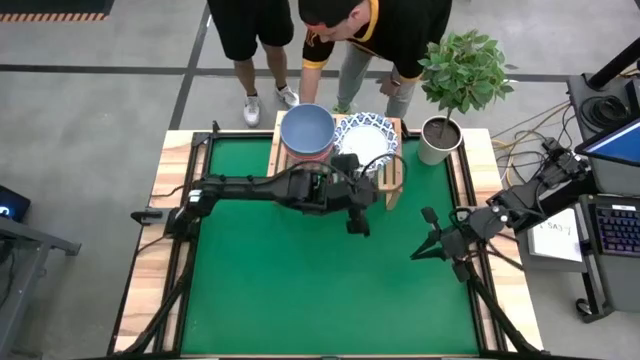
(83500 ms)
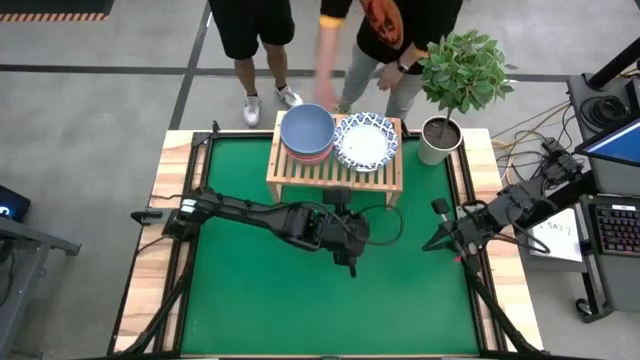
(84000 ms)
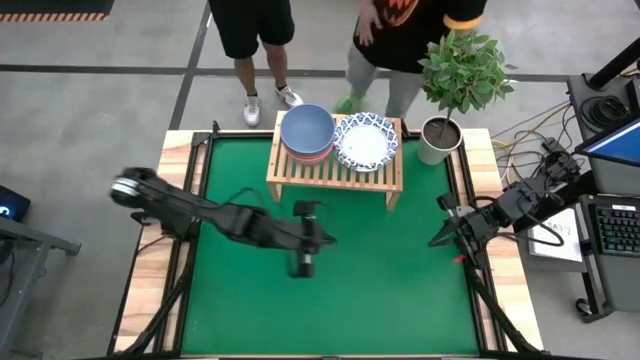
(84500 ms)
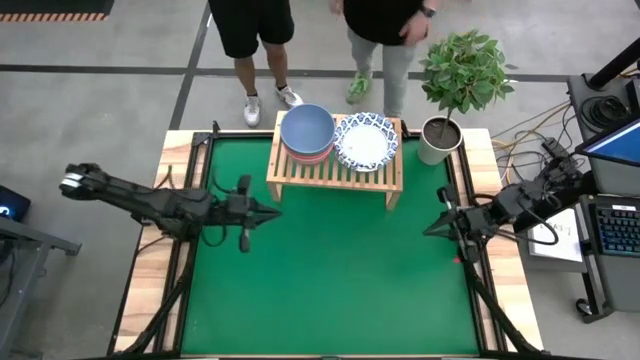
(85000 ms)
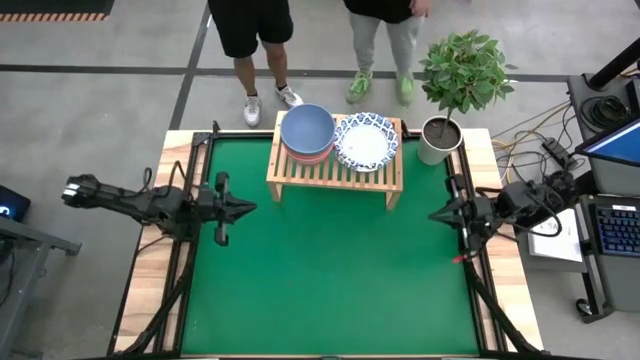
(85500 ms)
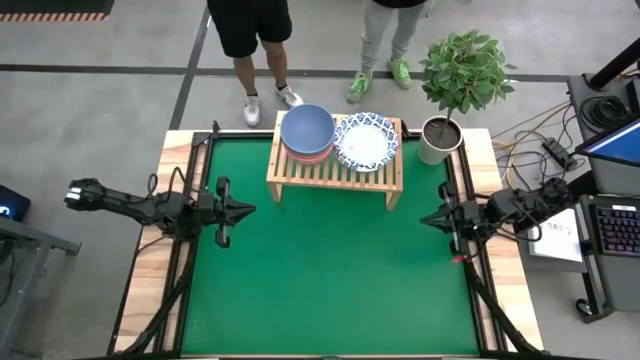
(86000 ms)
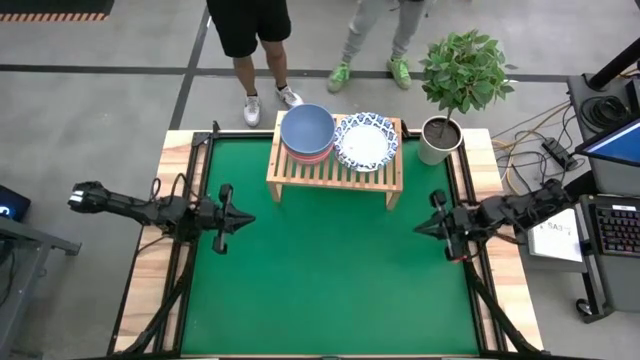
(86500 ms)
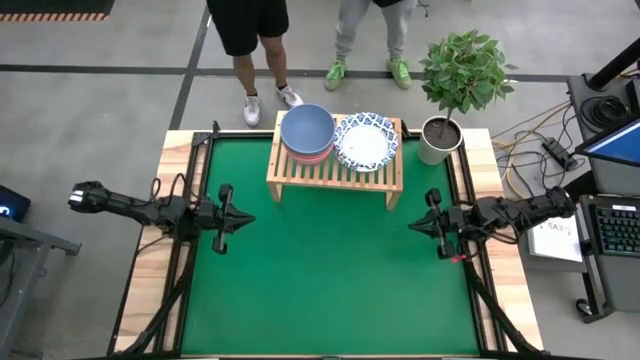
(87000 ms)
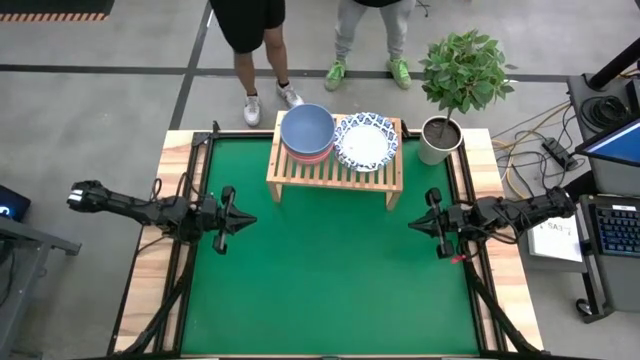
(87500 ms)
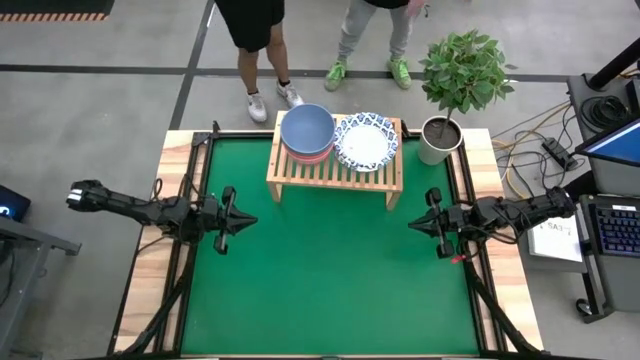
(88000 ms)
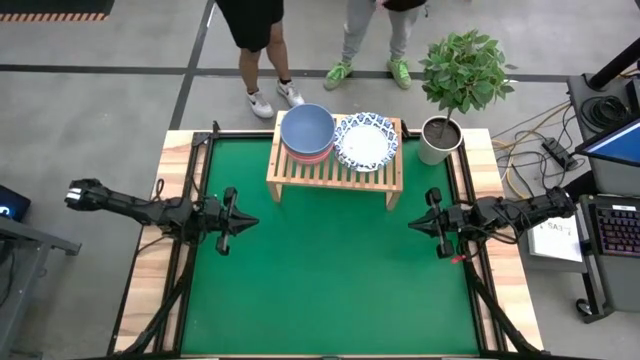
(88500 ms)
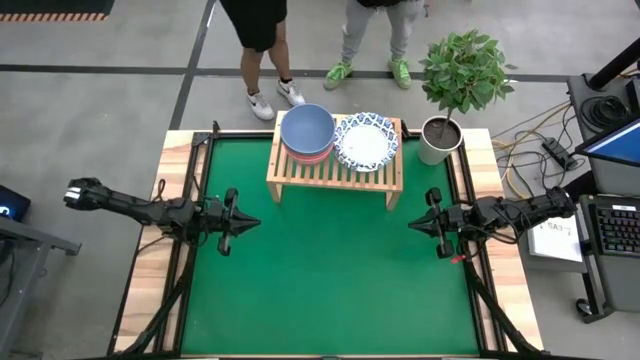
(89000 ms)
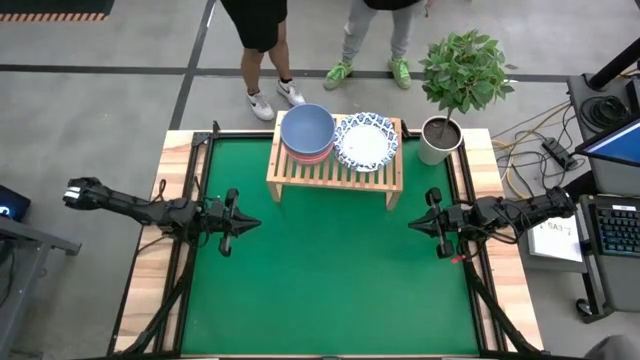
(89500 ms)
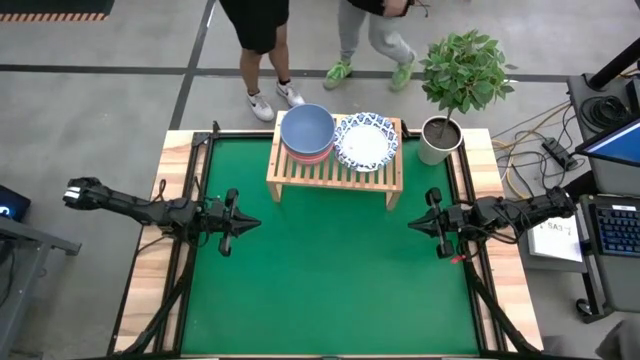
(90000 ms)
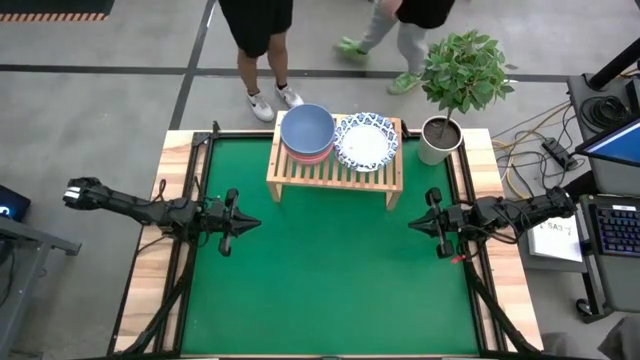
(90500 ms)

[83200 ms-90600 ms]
Task: Place and stack bowls onto a shelf
Return to Home Position

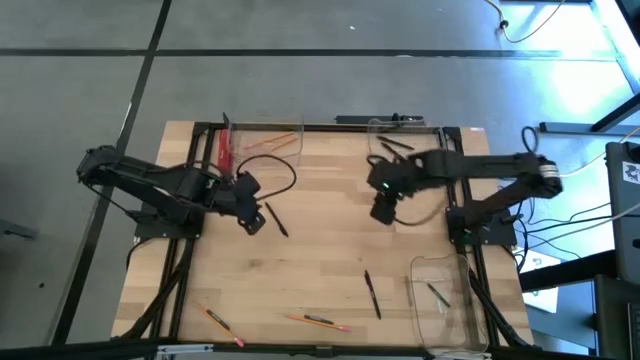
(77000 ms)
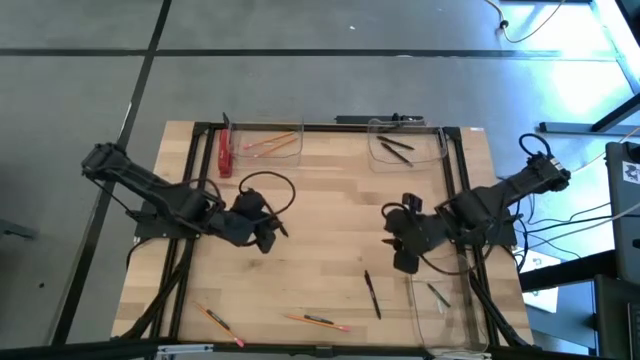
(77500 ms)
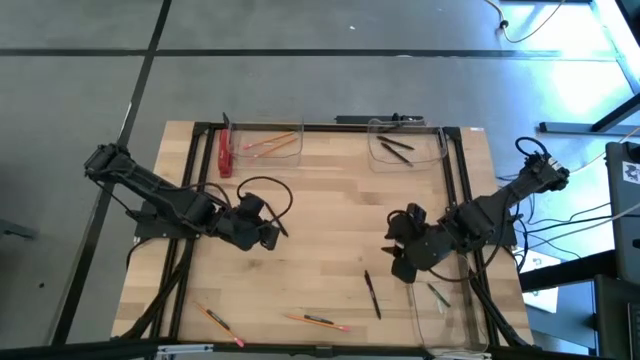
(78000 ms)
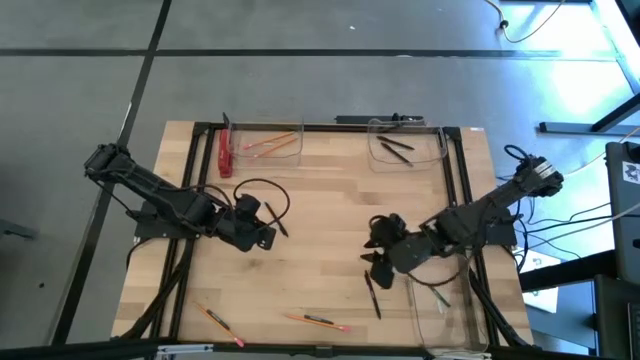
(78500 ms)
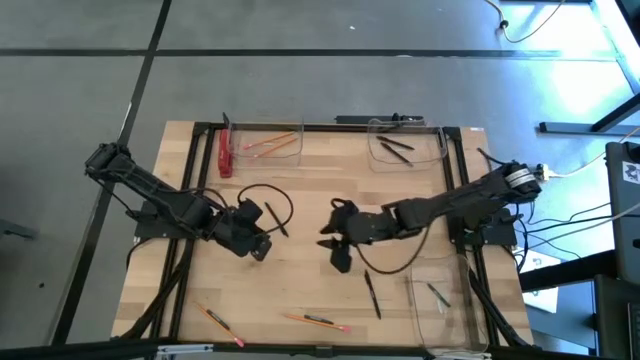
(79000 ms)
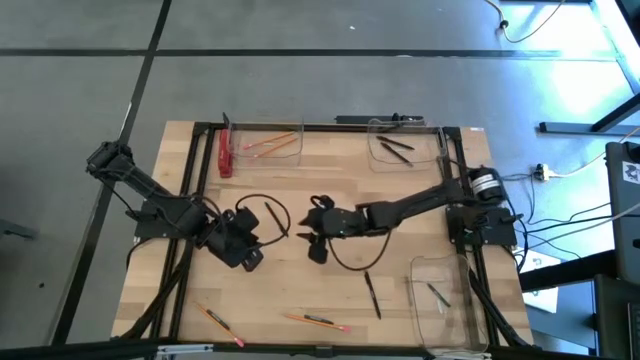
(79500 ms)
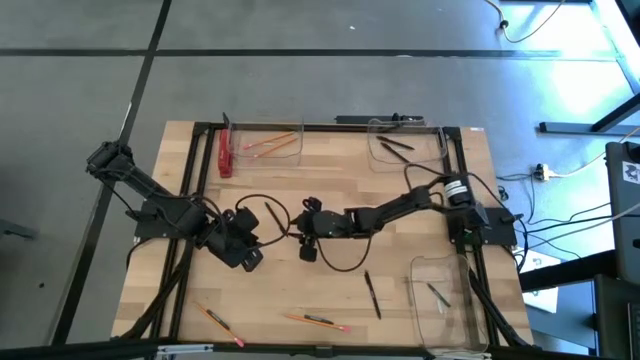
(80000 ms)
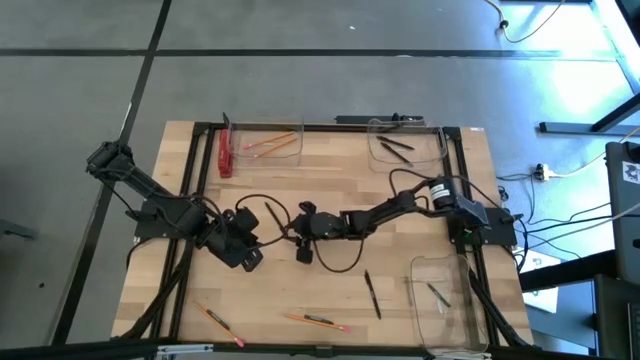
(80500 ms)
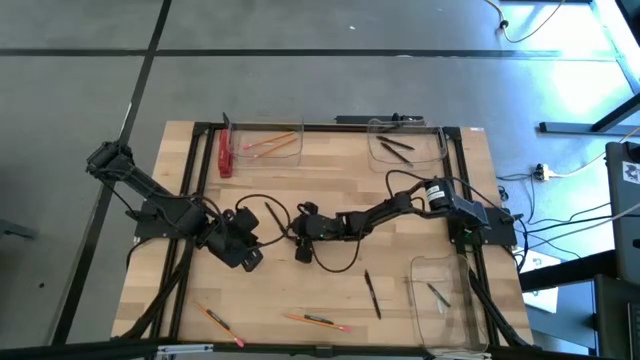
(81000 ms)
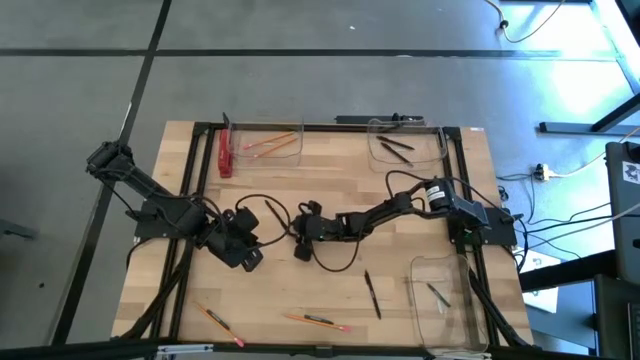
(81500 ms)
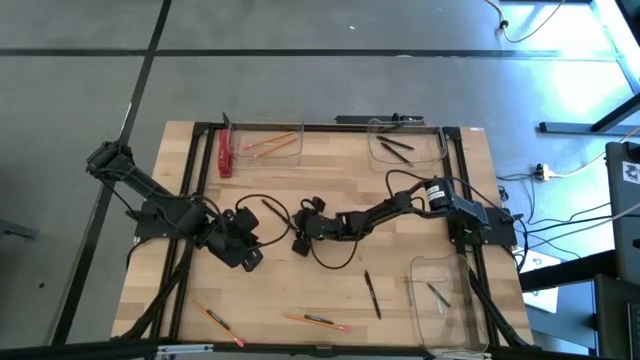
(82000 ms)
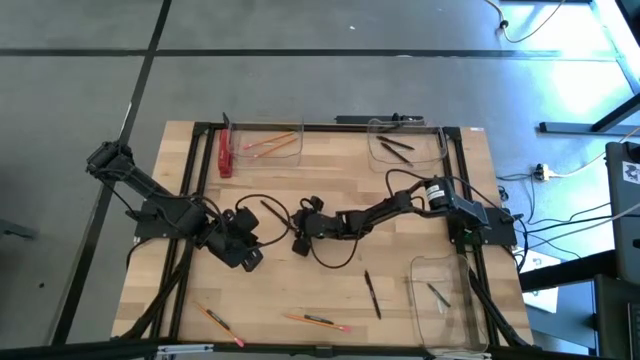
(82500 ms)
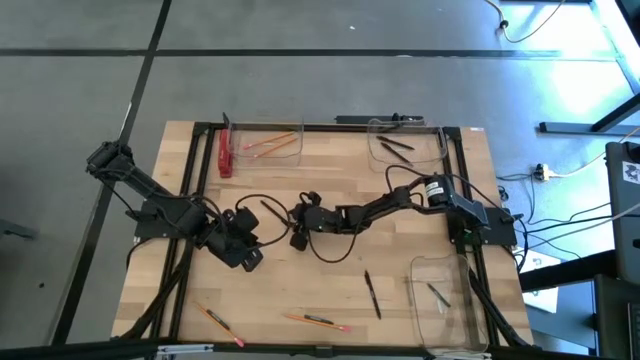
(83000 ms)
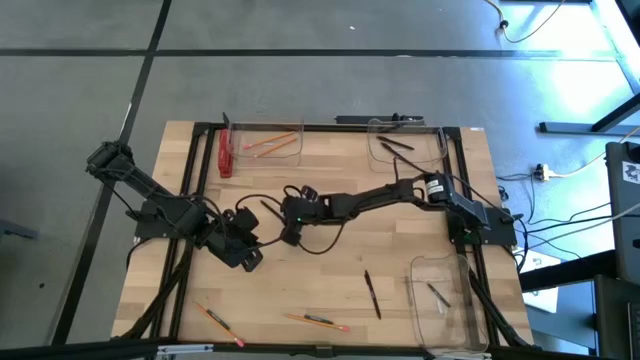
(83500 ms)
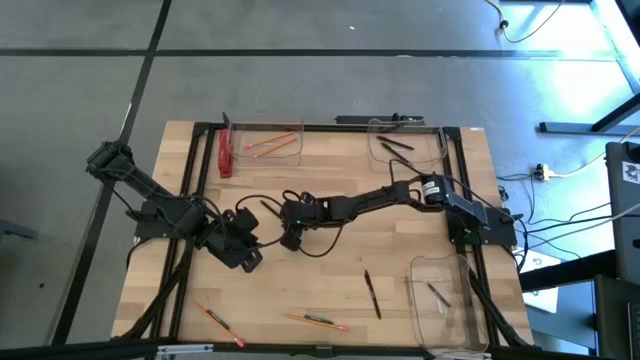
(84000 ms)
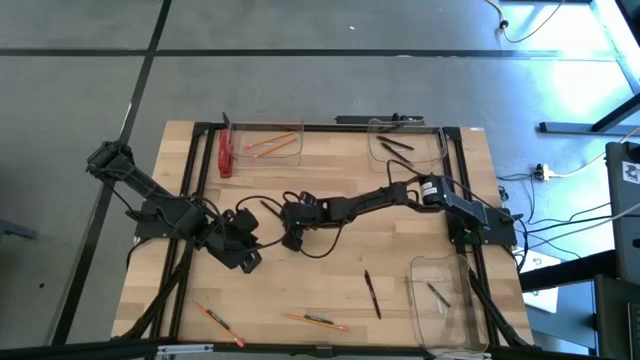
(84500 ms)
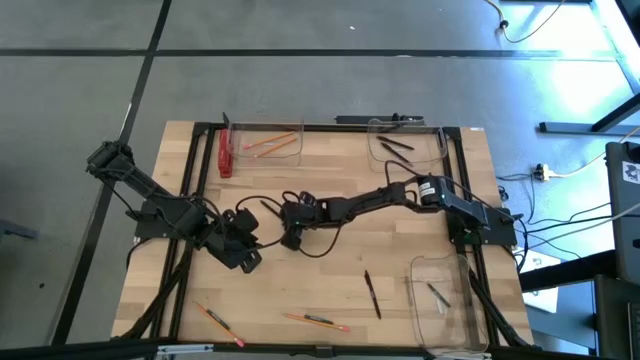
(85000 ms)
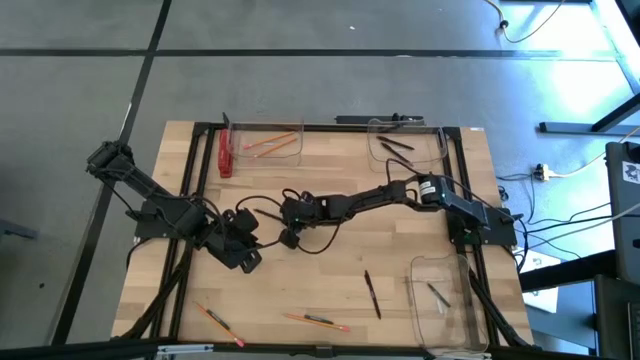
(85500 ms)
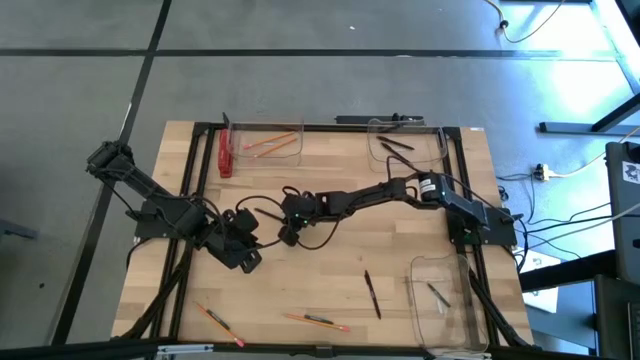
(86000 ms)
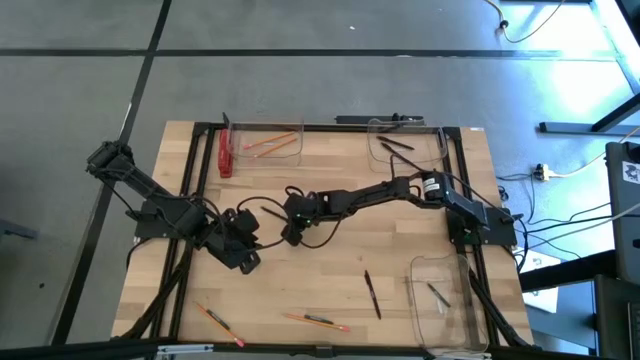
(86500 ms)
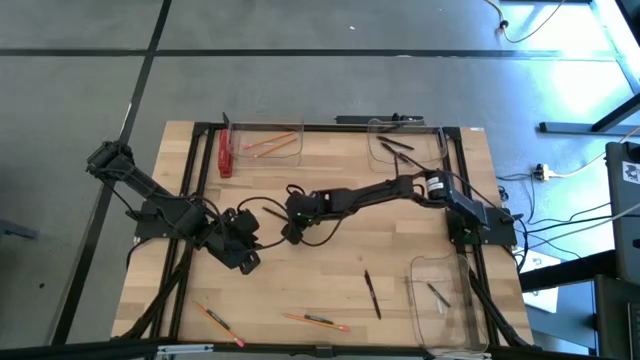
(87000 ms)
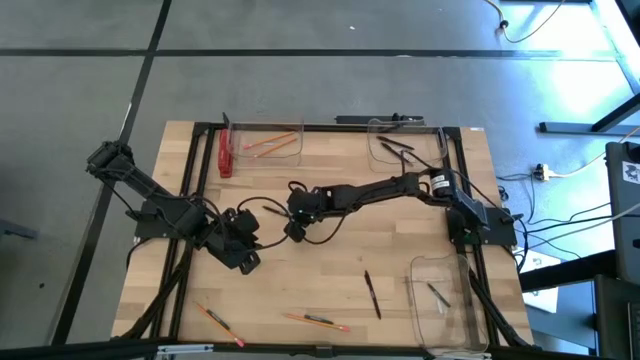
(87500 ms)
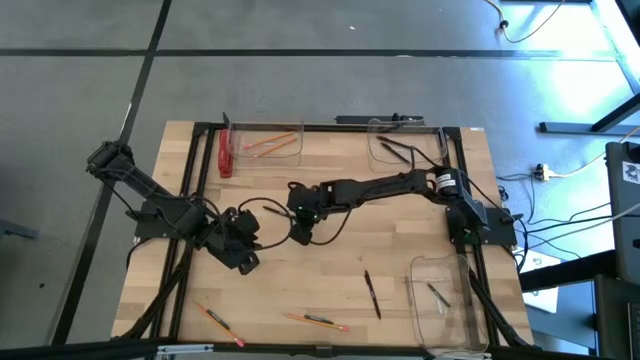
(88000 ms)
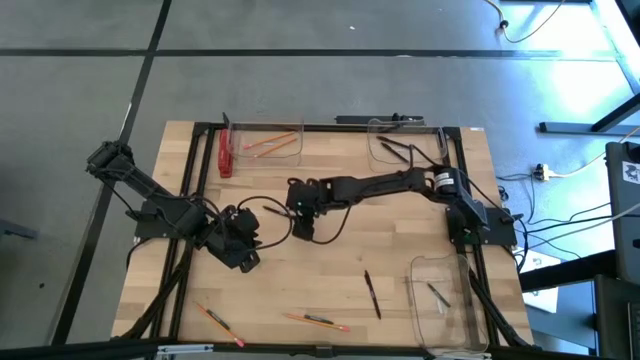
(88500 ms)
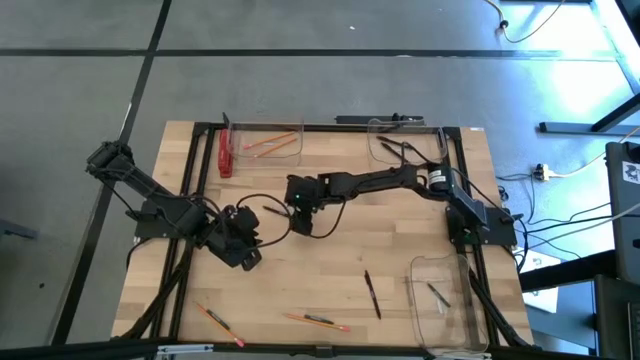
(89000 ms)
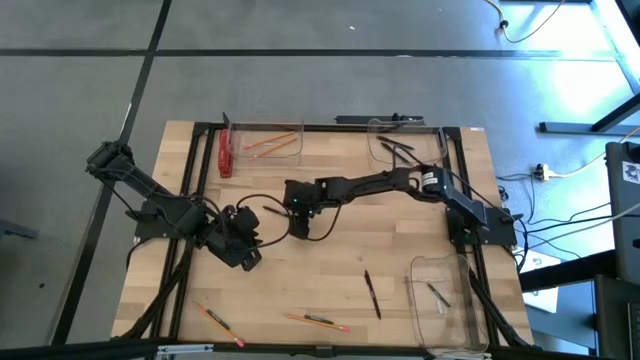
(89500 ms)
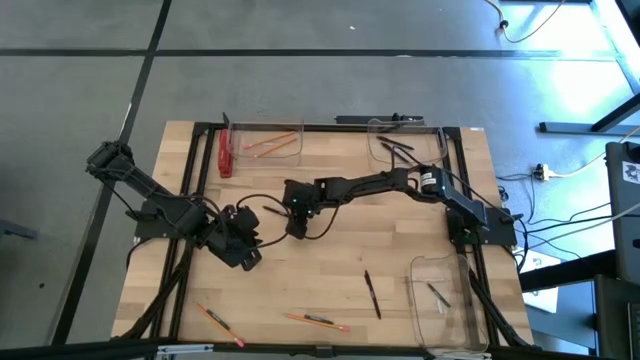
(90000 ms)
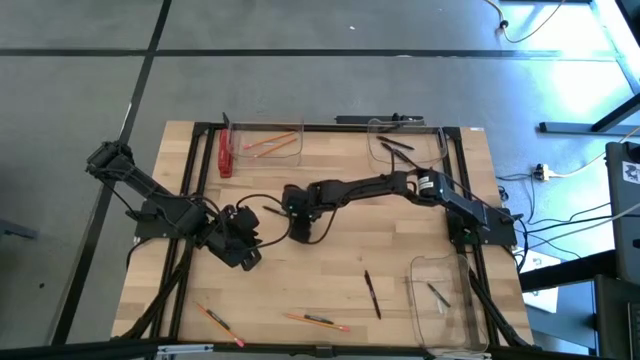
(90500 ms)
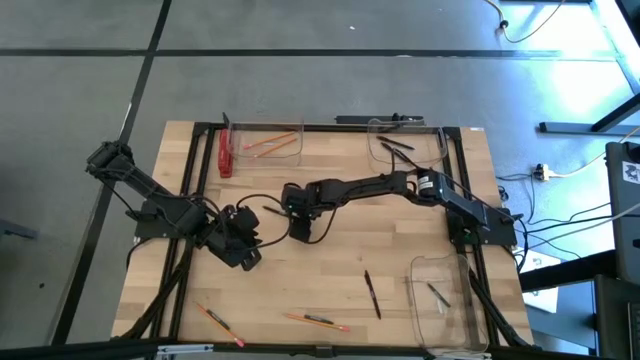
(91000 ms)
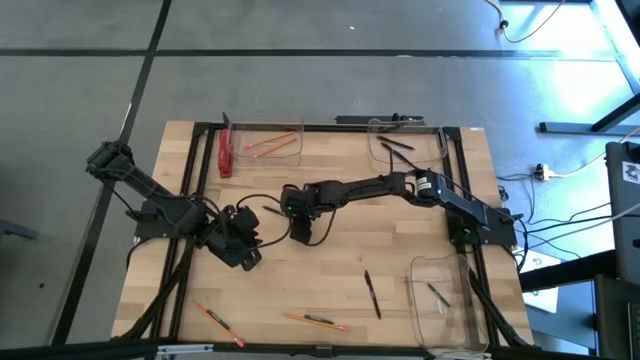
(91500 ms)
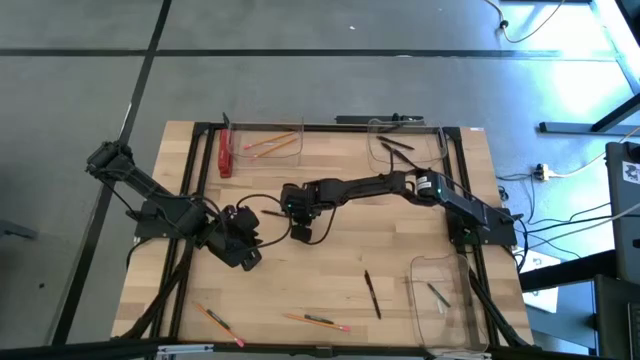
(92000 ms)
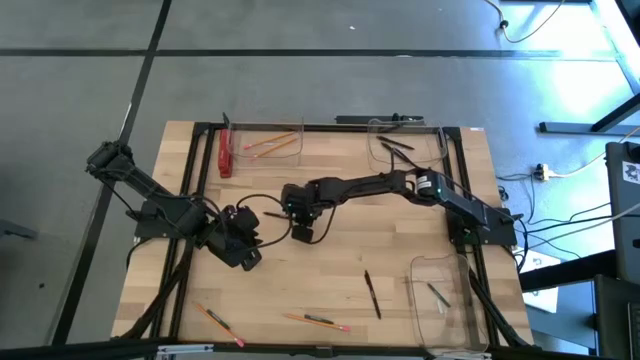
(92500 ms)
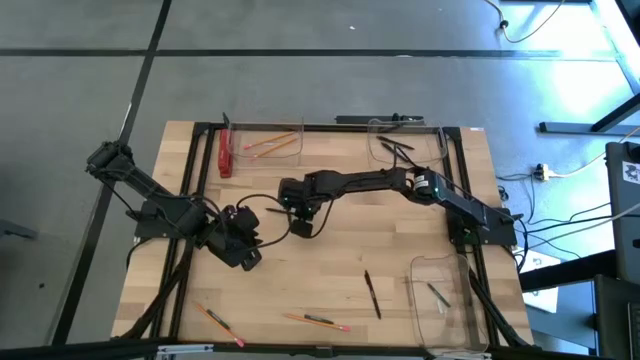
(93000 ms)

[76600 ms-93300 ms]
Task: Sort crayons/erasers/pens/pencils in bins
Put the top black pen into the top right transparent bin
